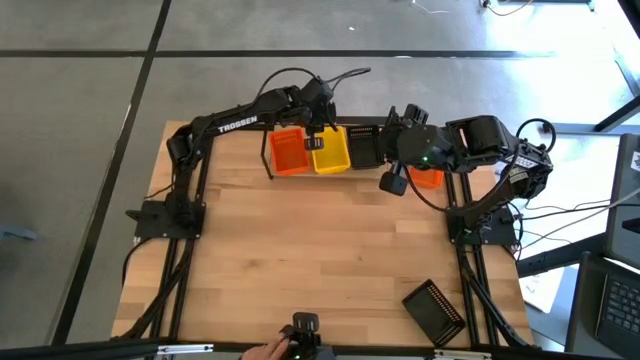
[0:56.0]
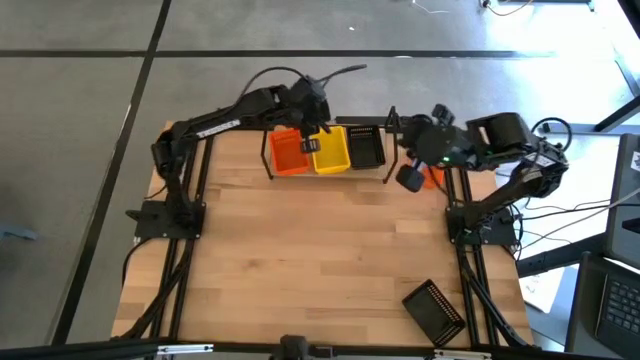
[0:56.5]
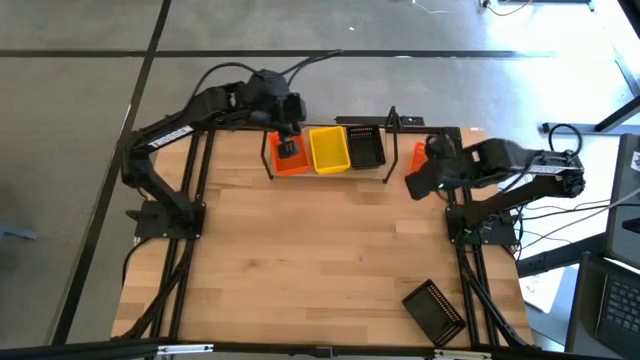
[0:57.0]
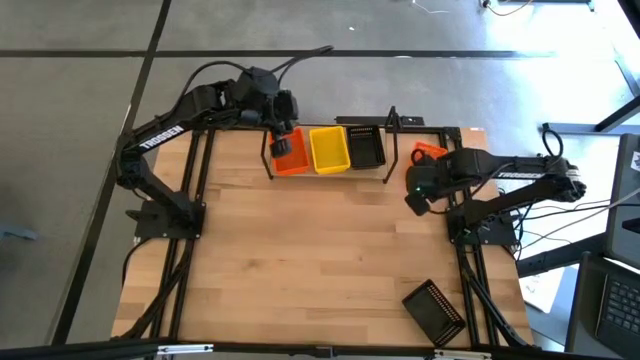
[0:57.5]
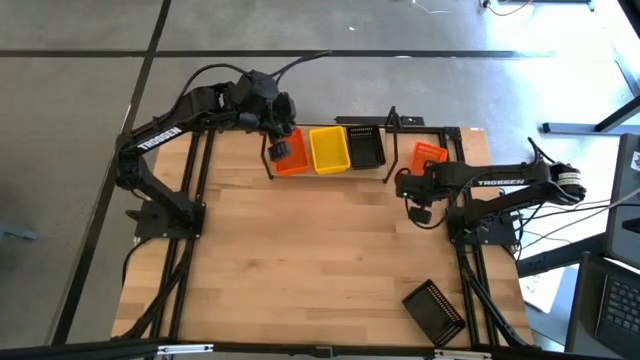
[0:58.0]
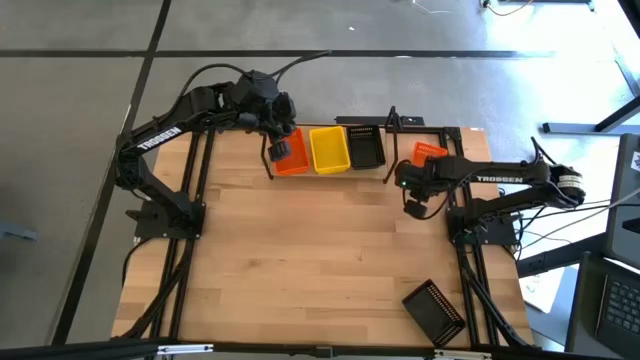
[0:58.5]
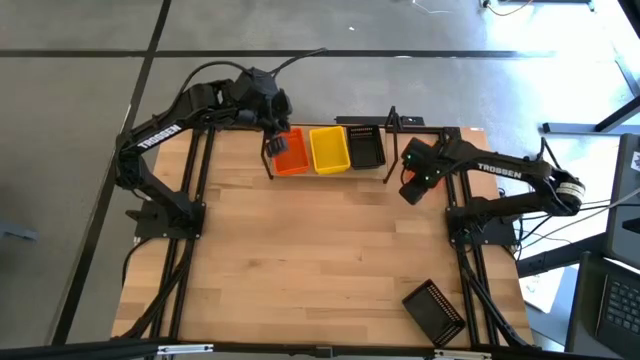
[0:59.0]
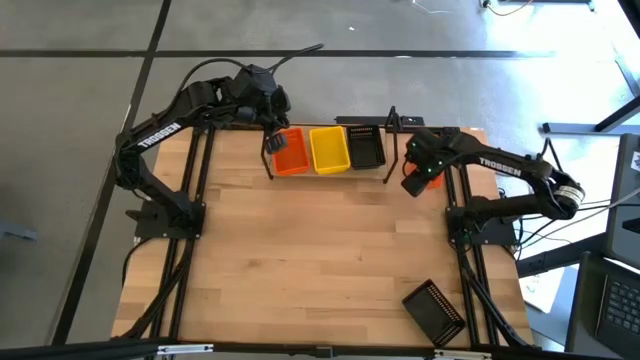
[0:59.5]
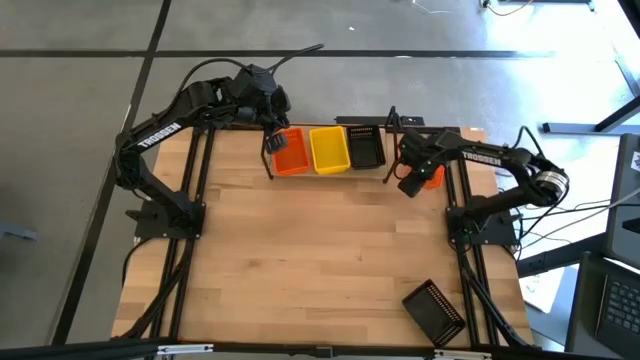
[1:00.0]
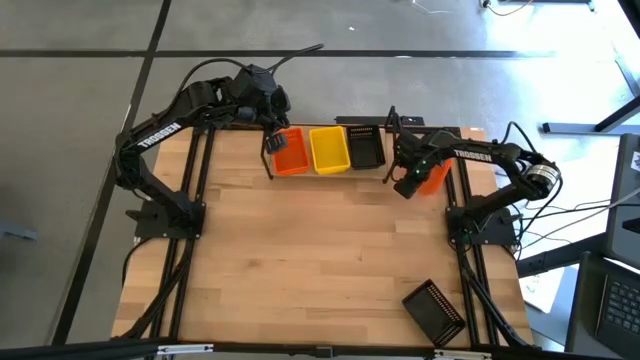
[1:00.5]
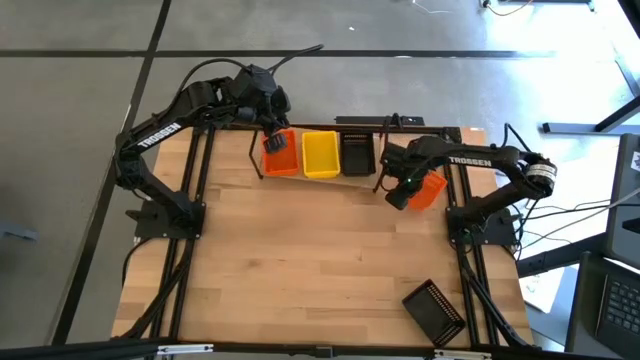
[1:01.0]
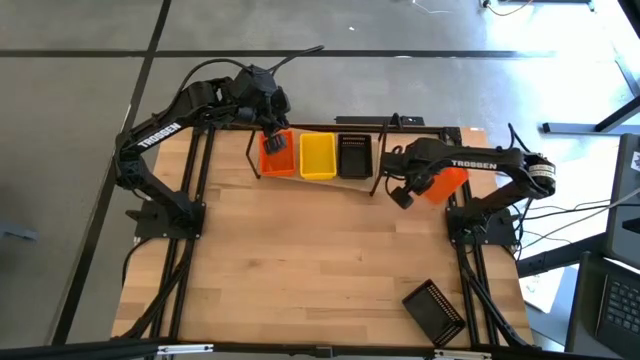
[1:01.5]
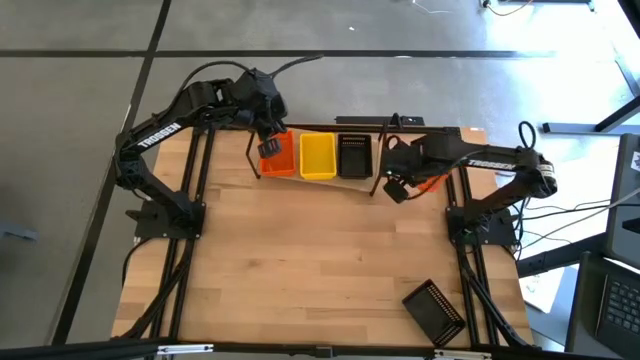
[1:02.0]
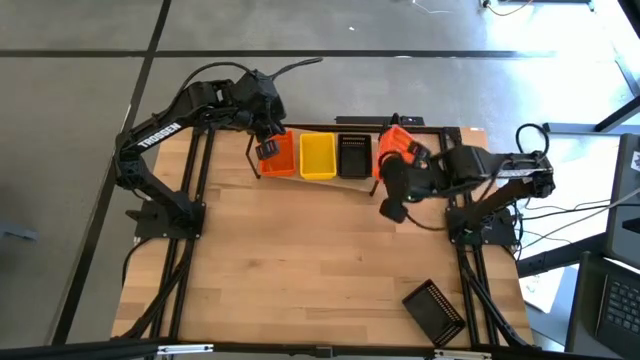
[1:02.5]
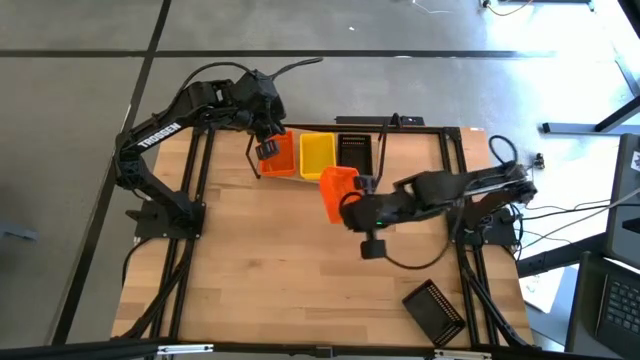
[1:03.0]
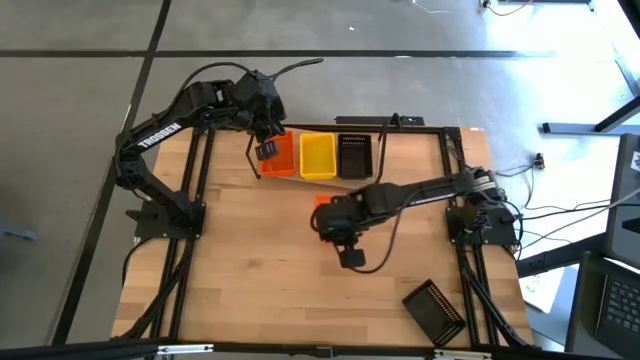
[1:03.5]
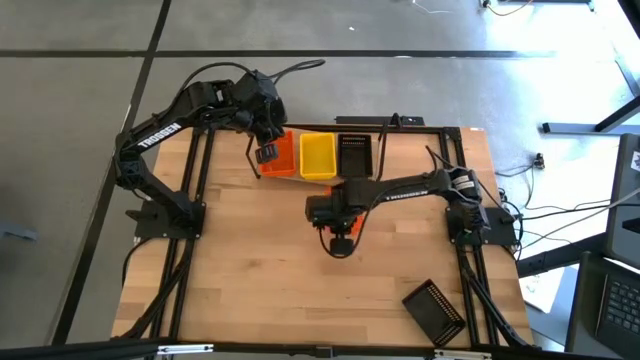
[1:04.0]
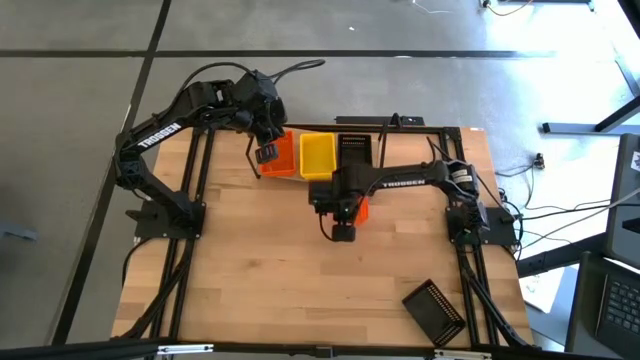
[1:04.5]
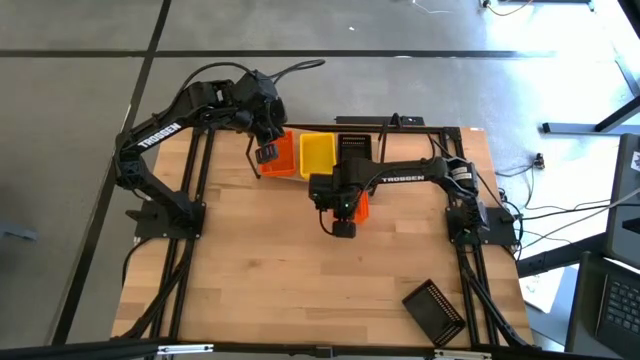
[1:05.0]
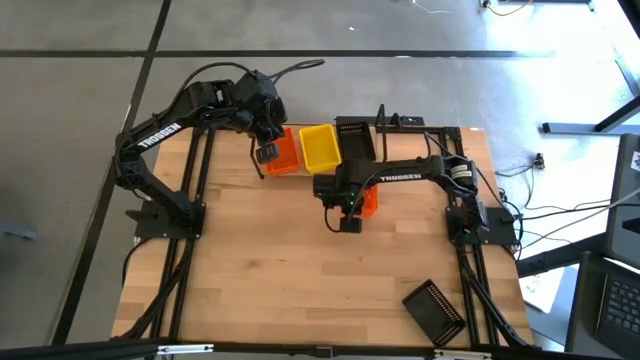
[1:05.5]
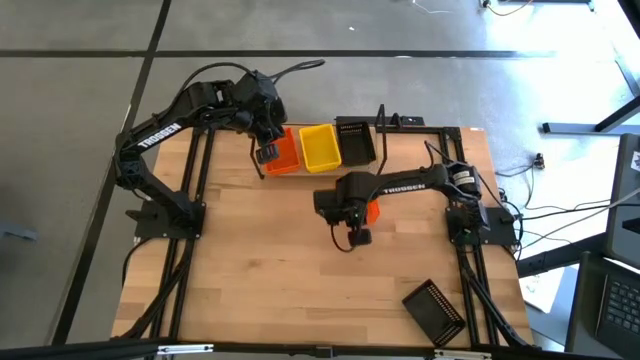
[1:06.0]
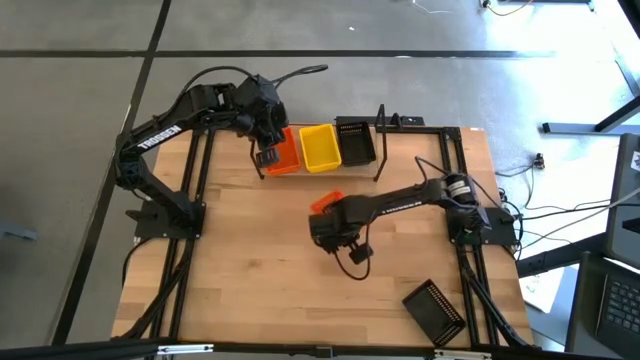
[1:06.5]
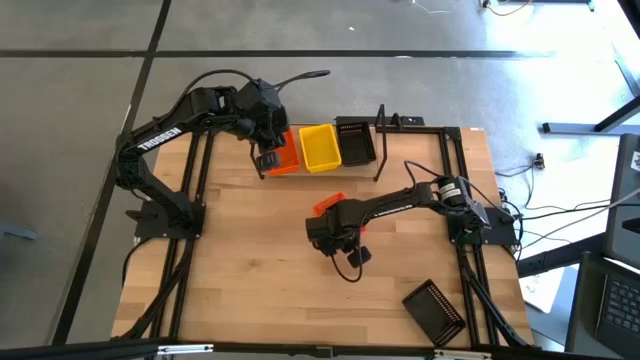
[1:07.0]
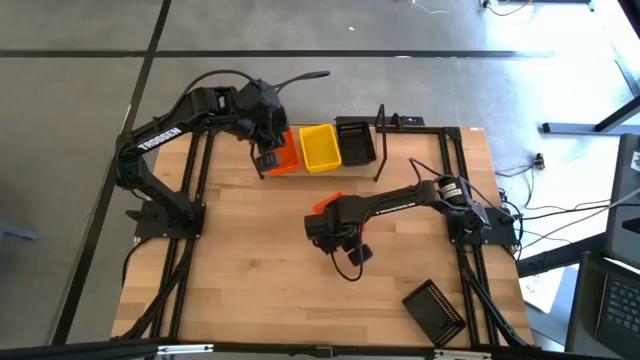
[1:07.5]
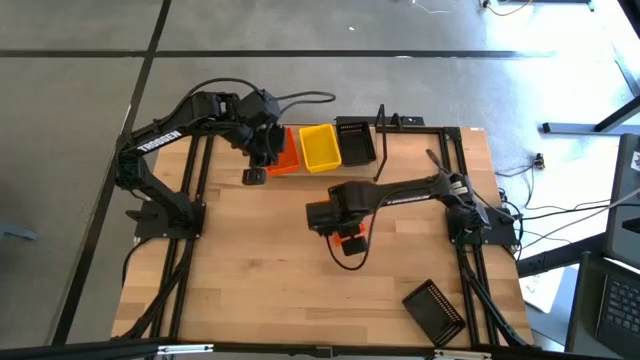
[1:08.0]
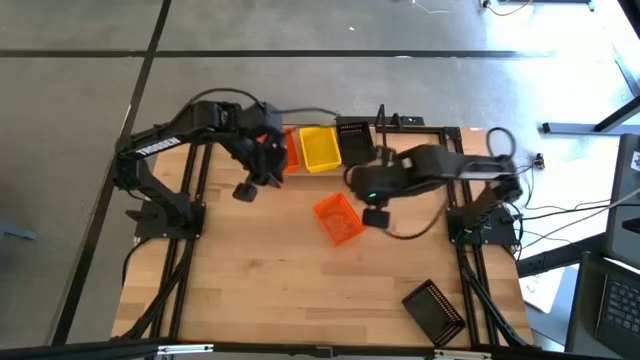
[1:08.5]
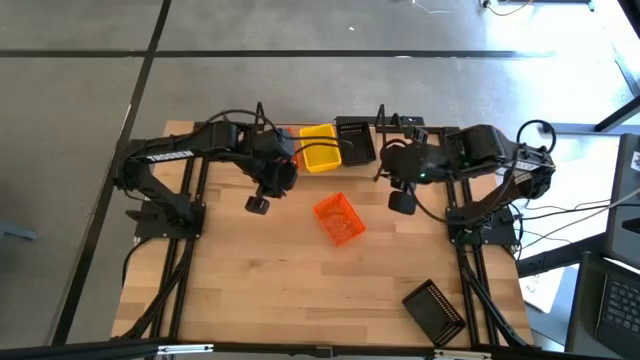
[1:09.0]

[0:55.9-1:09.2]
Task: Stack baskets on shelf by color
Stack the orange bin on the stacked bins on the shelf

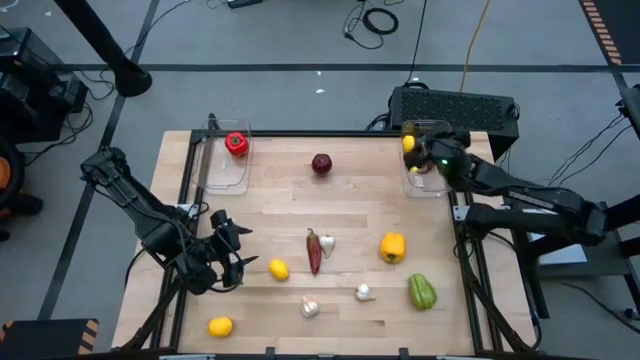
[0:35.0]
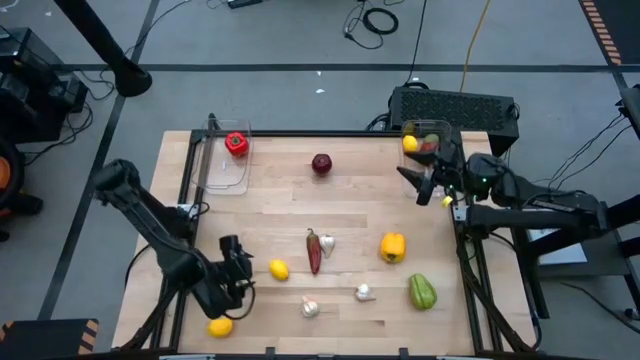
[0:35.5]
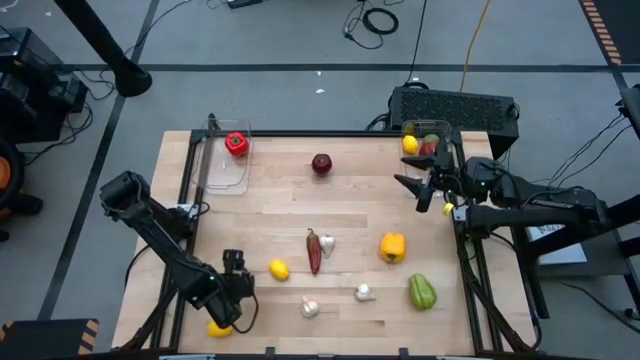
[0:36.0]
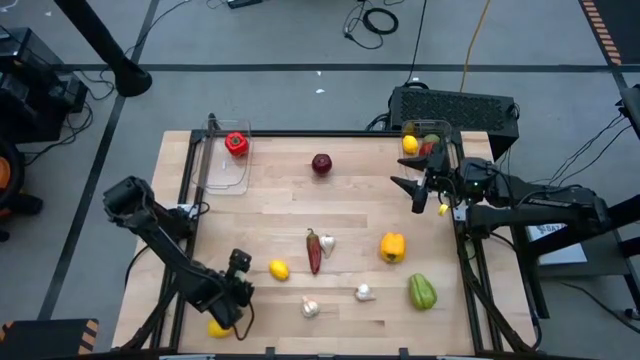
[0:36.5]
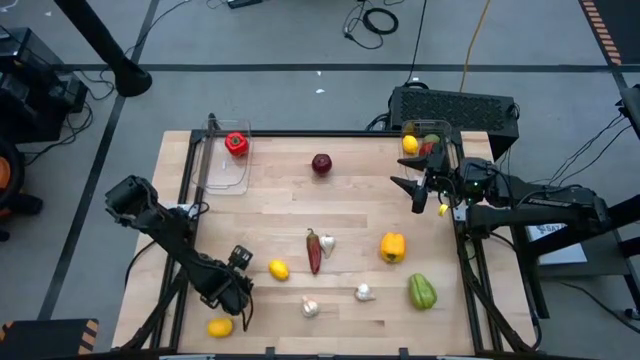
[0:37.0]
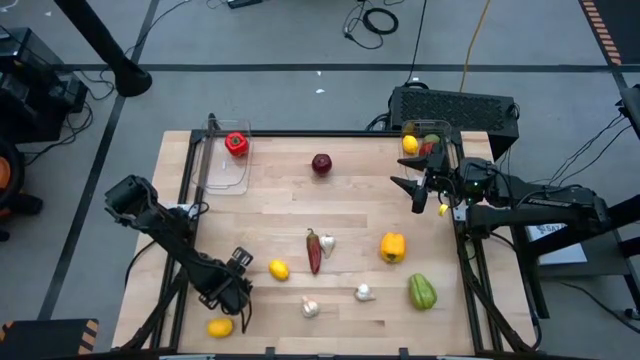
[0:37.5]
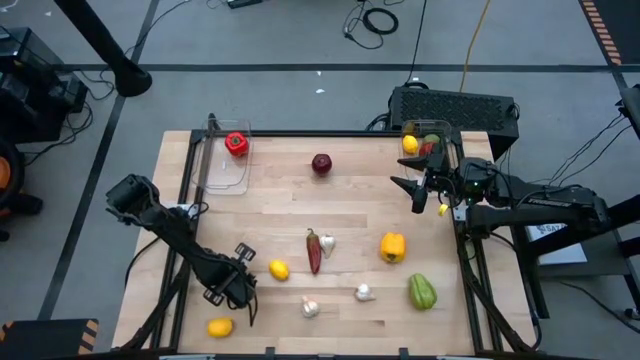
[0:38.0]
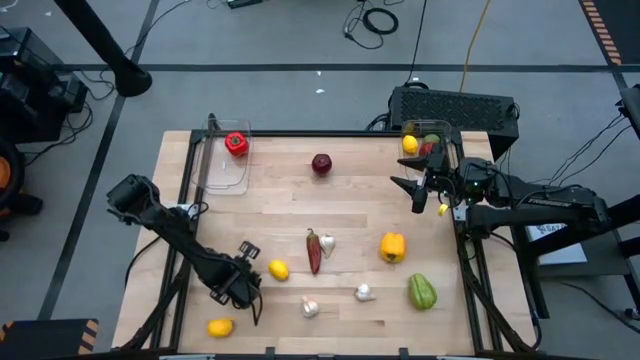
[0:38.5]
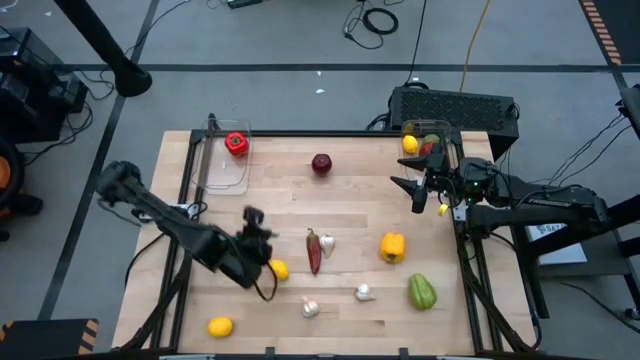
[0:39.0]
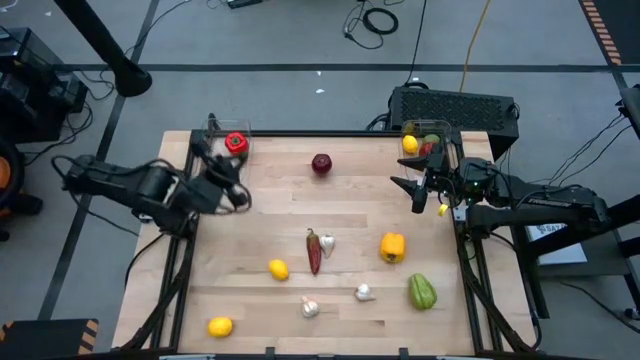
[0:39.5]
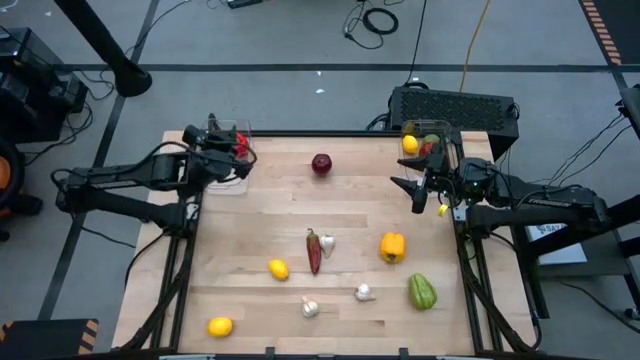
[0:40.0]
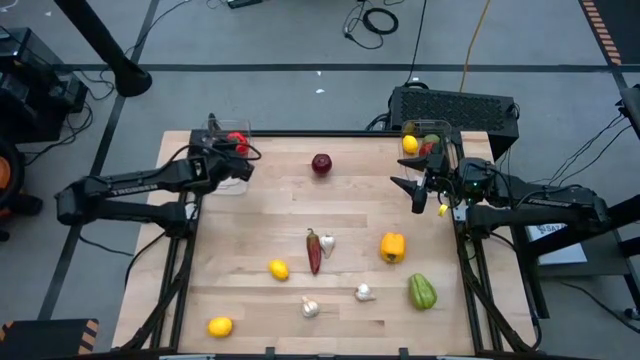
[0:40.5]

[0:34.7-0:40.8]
Task: Sort produce into baskets
Put the green chili pepper into the left transparent bin

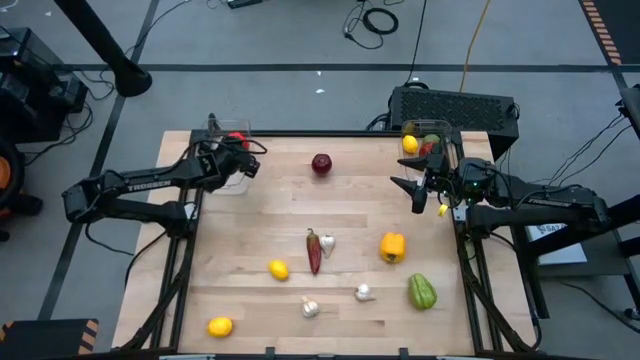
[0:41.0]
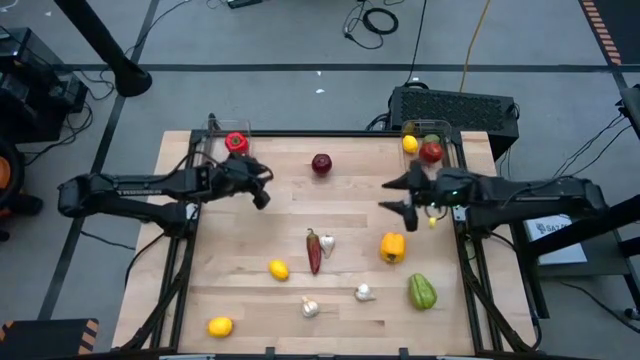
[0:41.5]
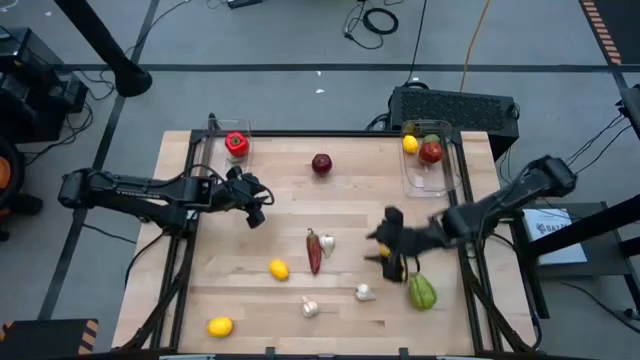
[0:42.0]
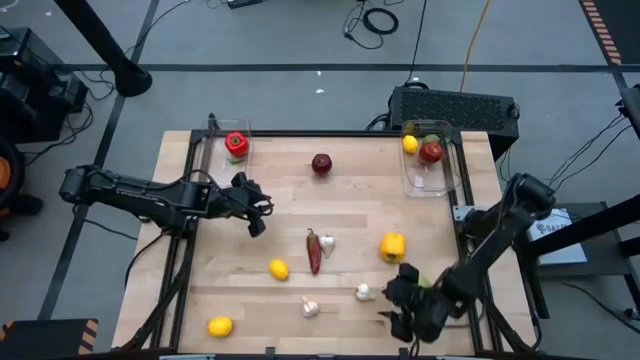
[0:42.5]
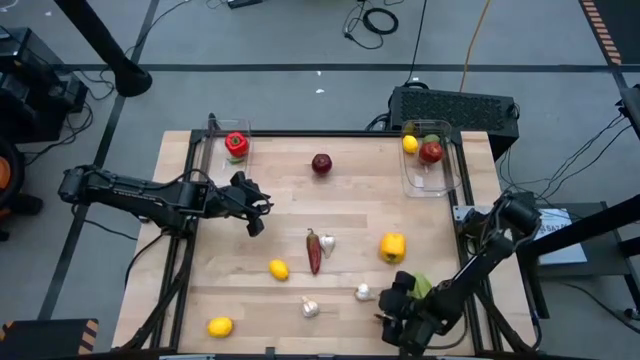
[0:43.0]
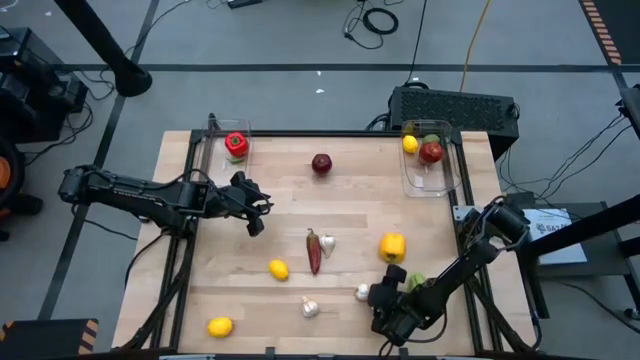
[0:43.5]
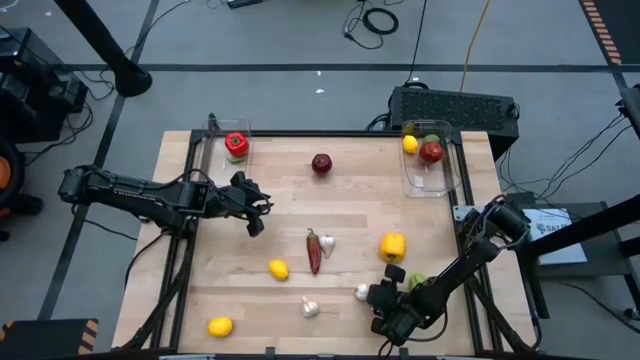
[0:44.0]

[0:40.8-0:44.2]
Put the bottom right white garlic into the left transparent bin
